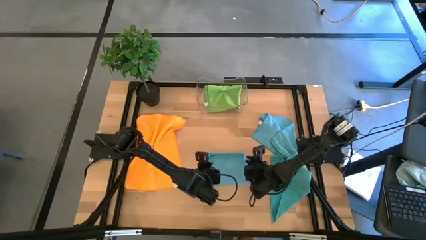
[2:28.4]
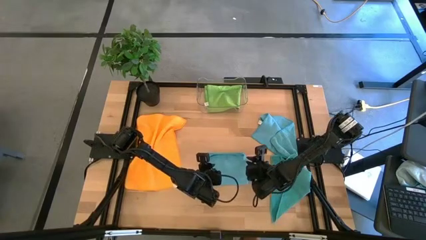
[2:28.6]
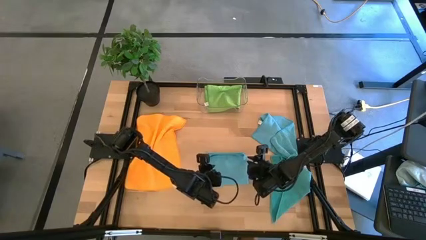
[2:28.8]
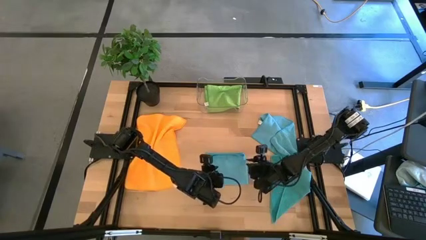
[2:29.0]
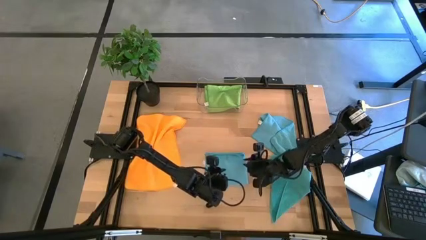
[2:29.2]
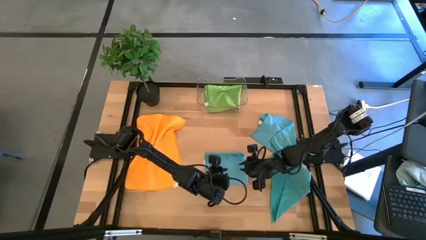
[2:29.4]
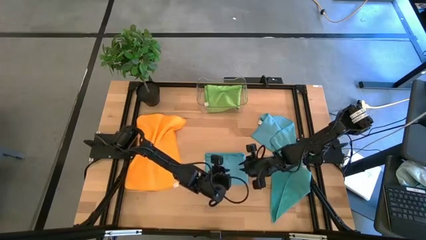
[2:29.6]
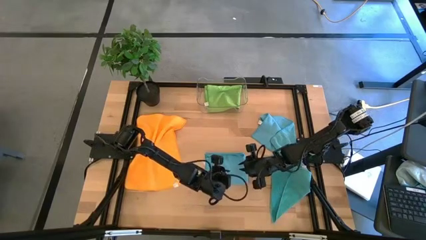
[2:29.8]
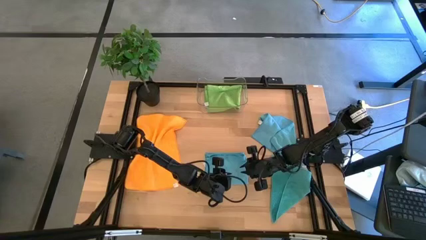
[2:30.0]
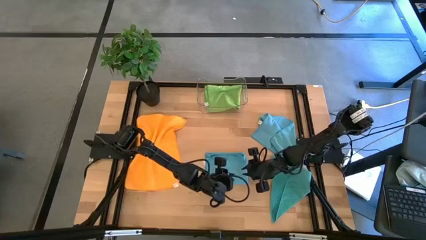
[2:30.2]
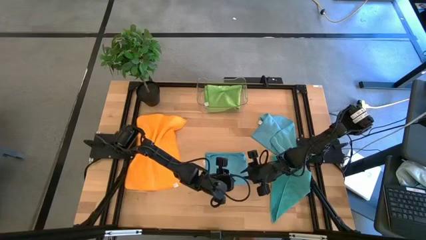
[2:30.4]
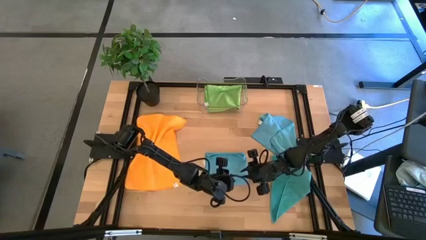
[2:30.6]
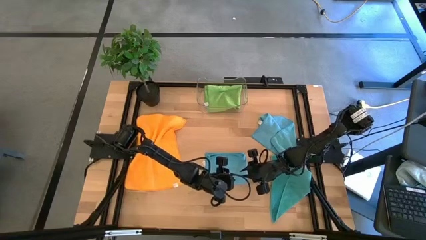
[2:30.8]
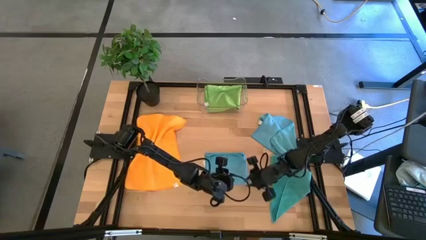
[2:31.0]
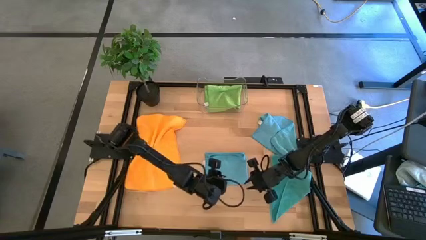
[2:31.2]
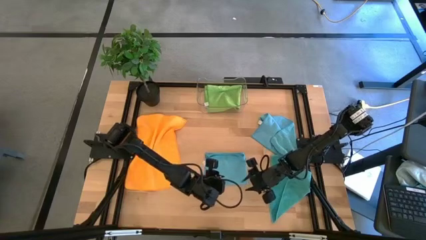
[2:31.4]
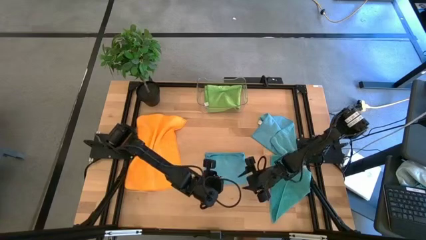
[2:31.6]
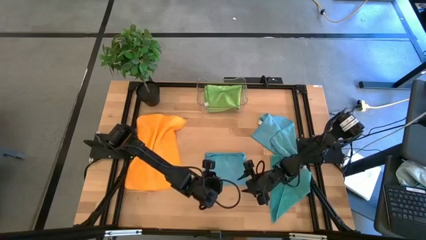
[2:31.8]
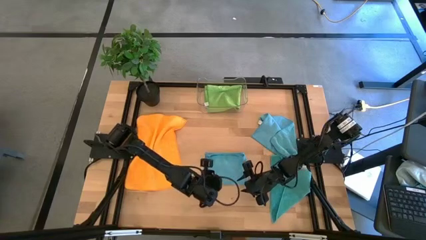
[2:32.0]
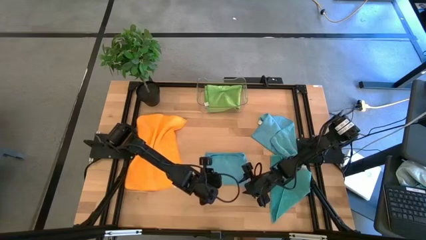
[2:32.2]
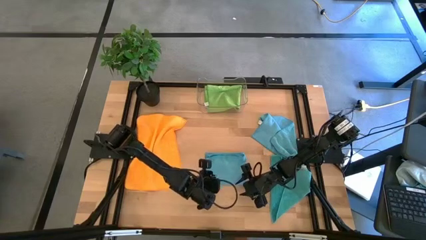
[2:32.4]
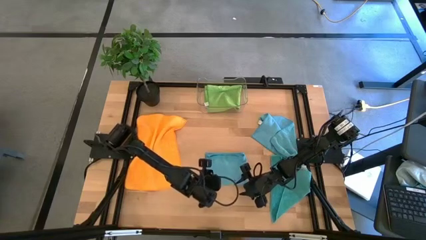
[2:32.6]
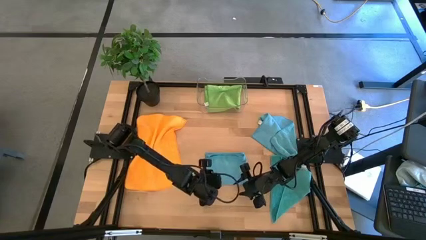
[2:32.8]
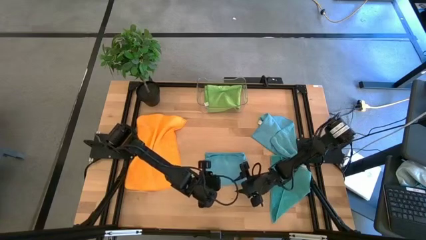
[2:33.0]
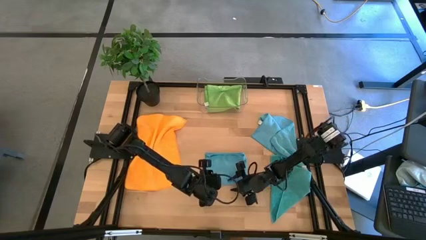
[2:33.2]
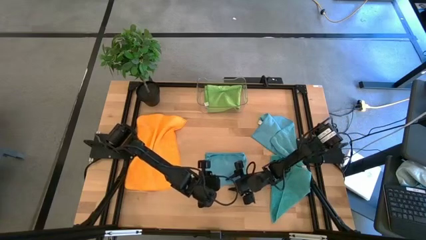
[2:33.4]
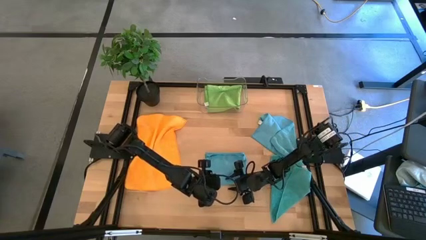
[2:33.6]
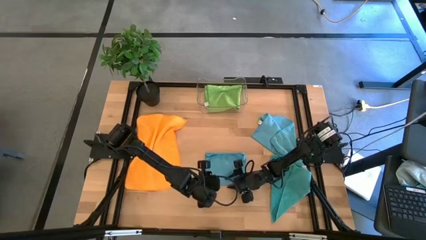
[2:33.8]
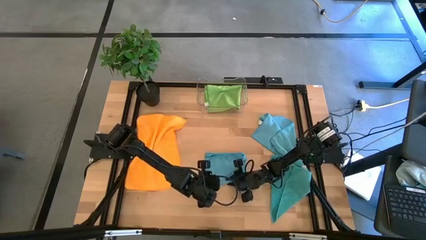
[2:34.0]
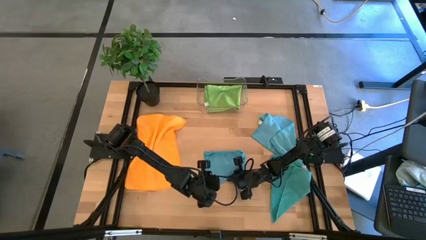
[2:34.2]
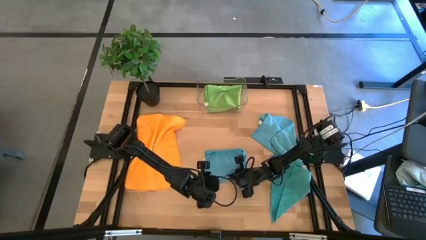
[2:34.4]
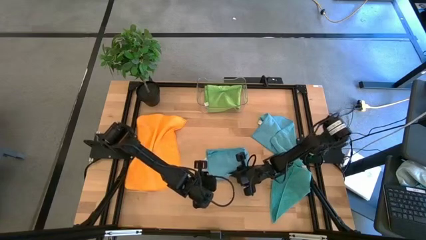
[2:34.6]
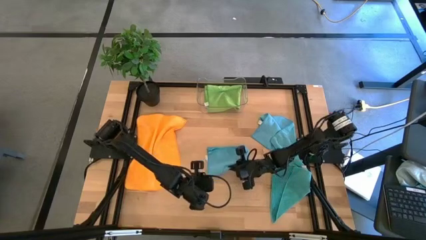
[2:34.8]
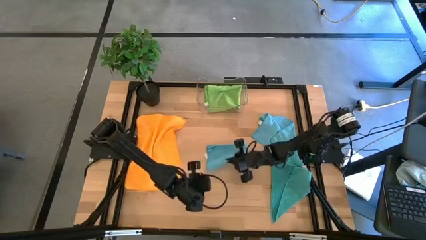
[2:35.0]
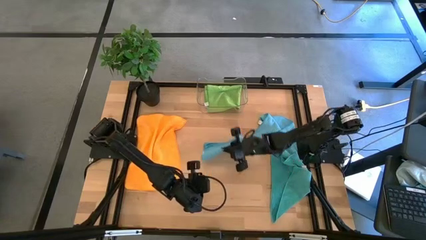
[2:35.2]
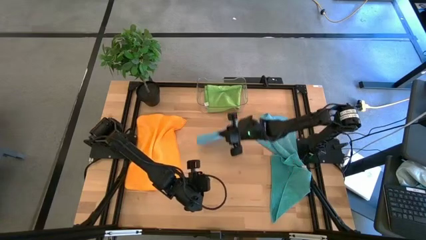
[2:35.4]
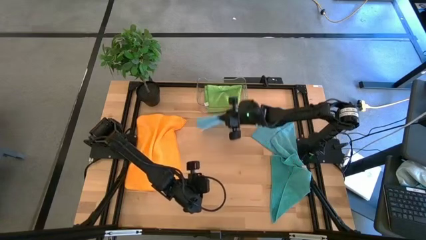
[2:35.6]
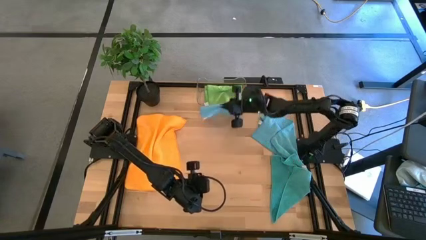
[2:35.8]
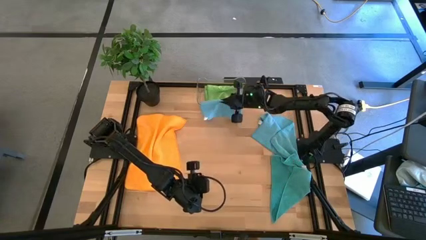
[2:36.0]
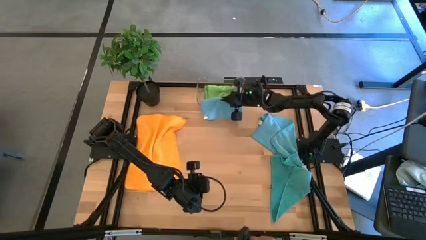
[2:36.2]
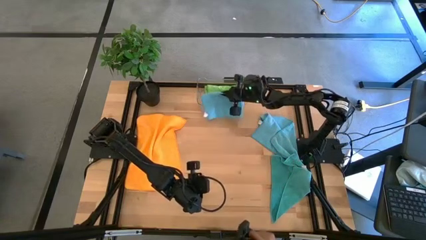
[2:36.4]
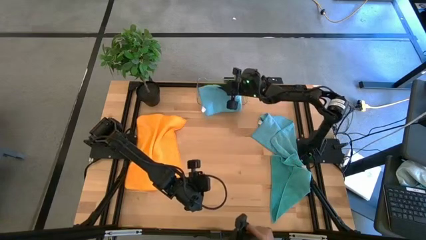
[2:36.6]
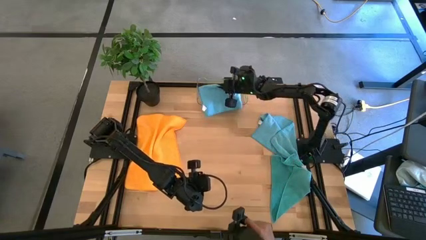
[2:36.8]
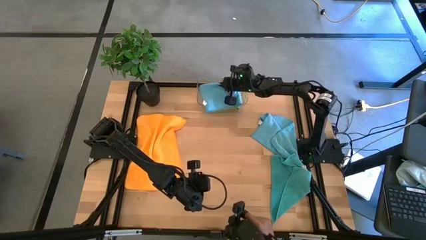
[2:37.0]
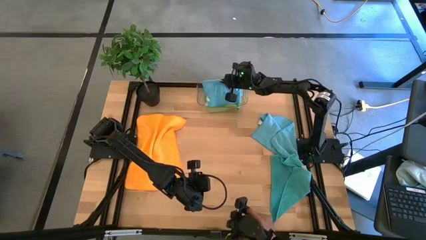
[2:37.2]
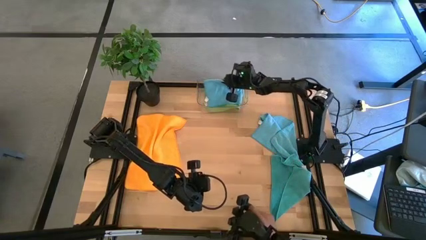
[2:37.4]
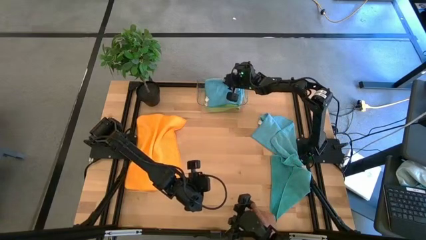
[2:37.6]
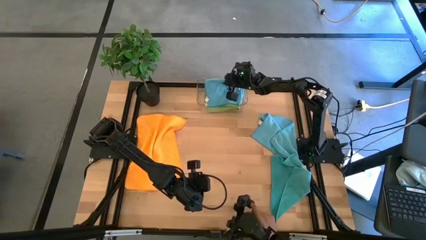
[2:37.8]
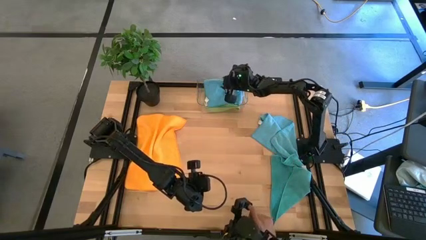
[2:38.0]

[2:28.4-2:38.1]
Task: Fold microfiber towels
Put the folded blue microfiber towel into the transparent bin

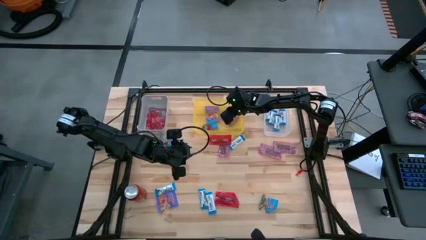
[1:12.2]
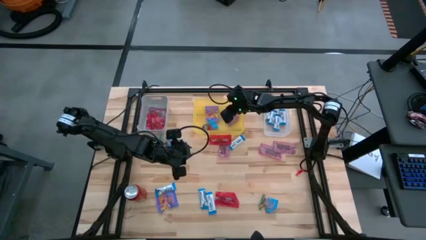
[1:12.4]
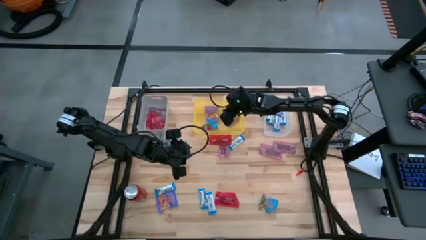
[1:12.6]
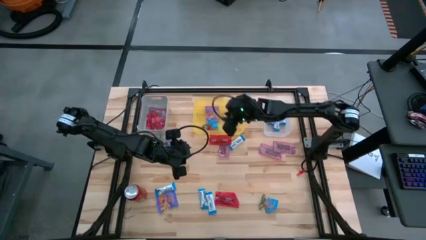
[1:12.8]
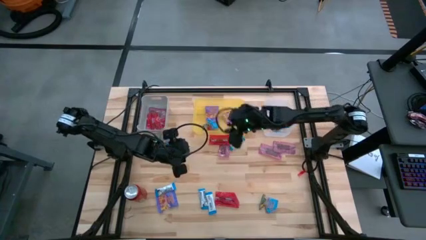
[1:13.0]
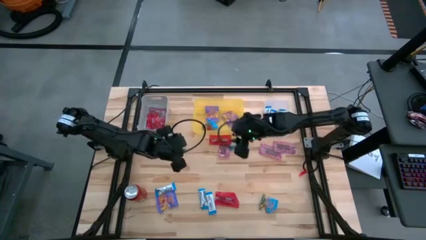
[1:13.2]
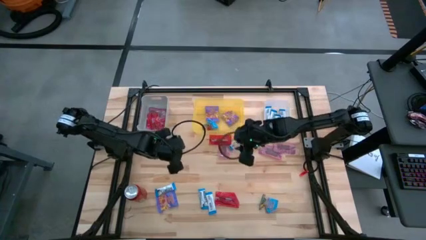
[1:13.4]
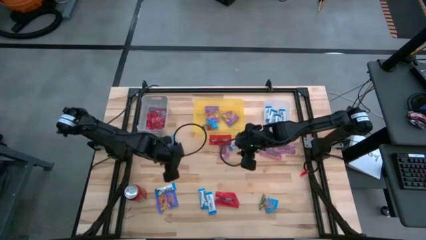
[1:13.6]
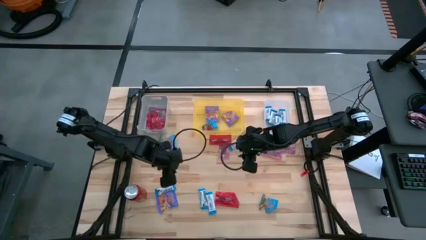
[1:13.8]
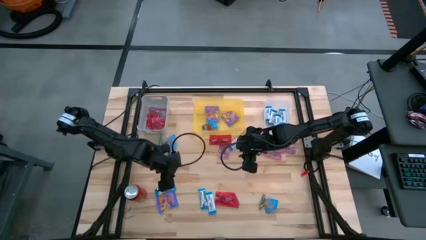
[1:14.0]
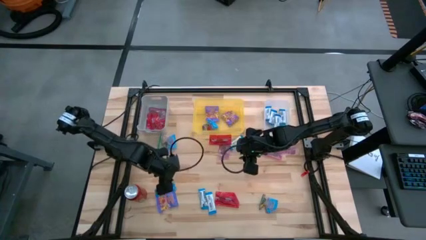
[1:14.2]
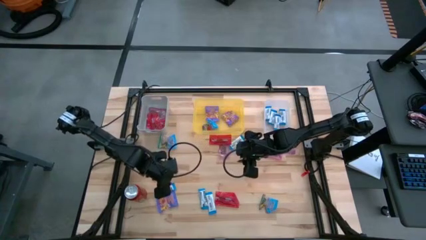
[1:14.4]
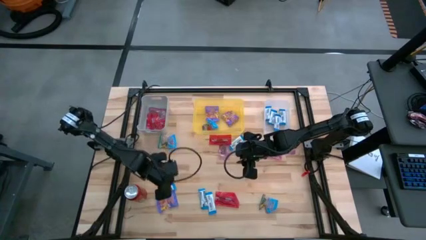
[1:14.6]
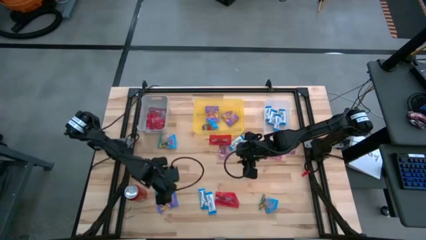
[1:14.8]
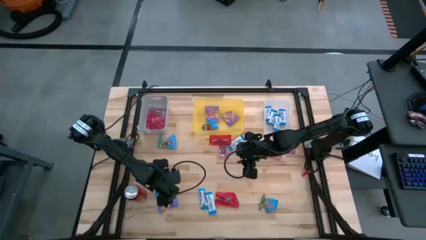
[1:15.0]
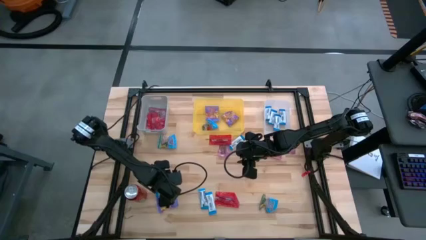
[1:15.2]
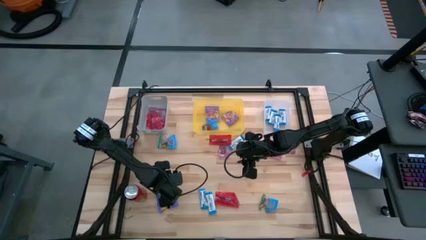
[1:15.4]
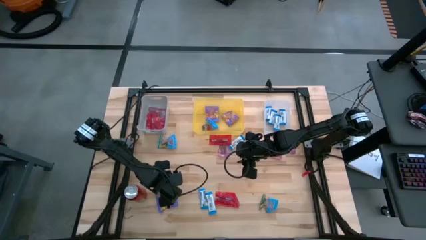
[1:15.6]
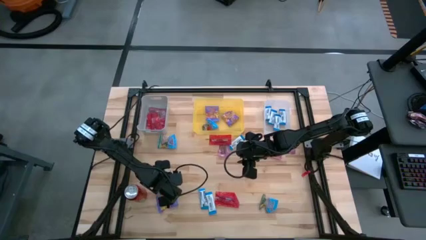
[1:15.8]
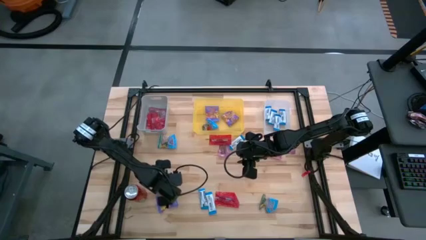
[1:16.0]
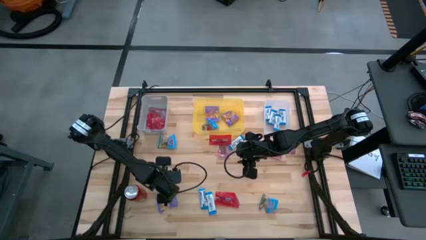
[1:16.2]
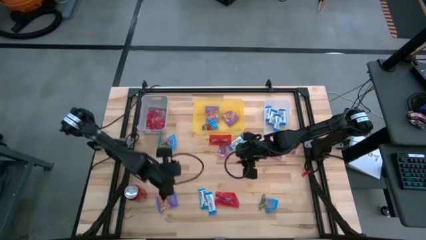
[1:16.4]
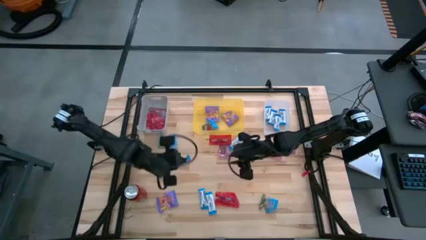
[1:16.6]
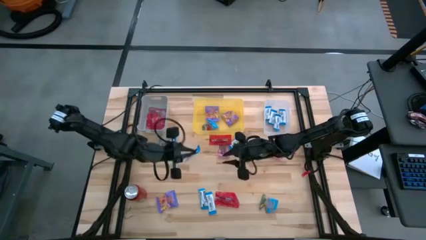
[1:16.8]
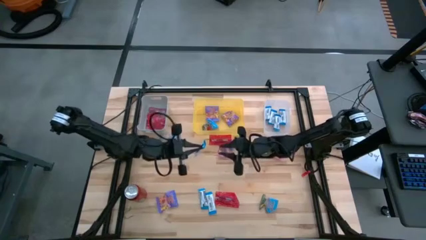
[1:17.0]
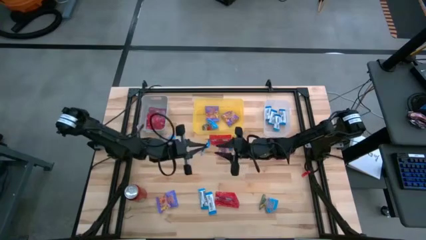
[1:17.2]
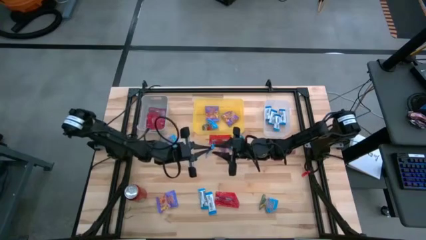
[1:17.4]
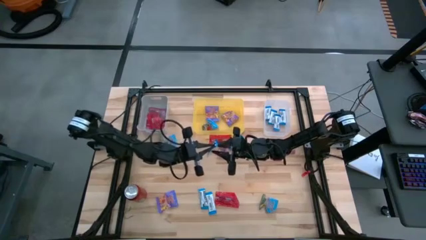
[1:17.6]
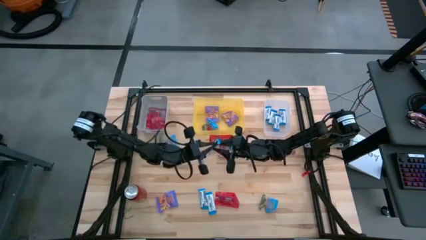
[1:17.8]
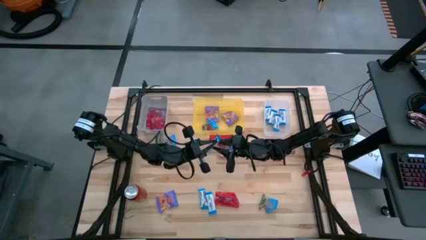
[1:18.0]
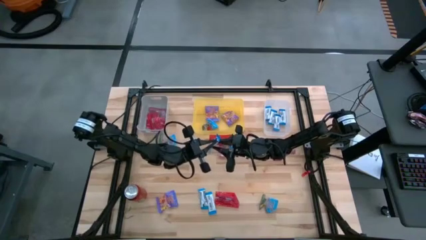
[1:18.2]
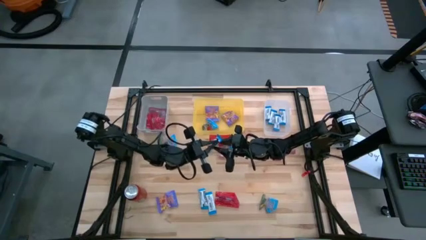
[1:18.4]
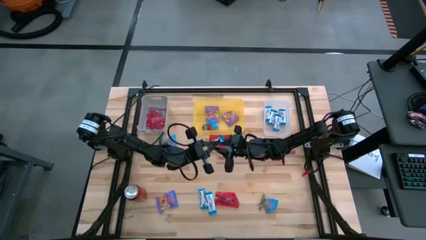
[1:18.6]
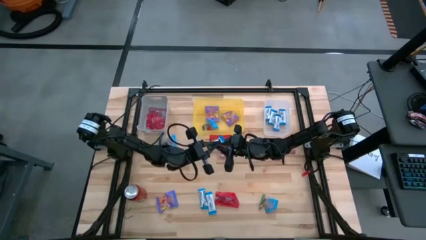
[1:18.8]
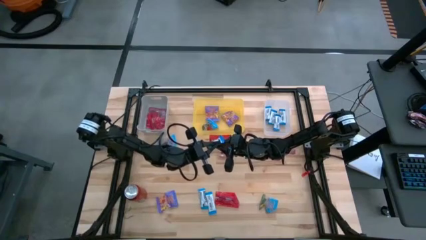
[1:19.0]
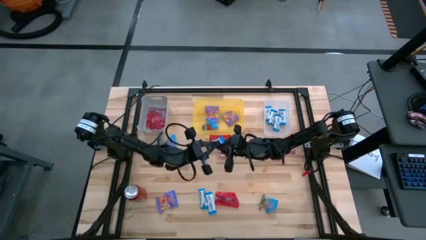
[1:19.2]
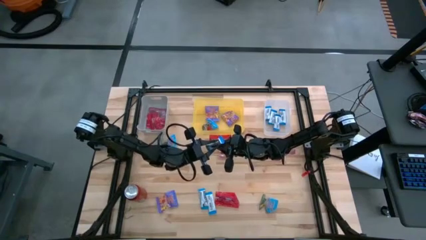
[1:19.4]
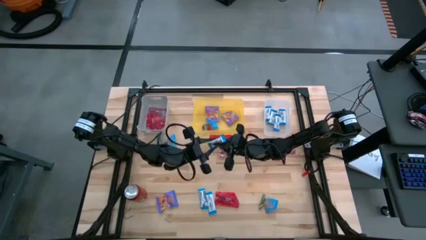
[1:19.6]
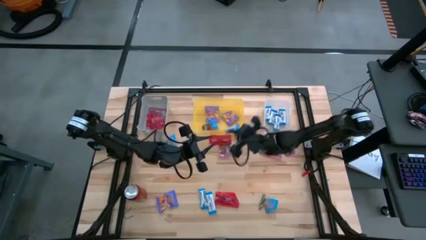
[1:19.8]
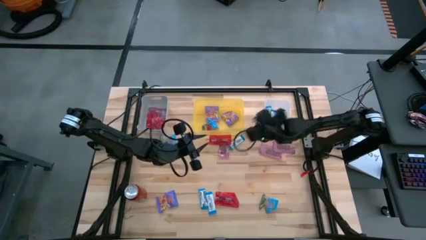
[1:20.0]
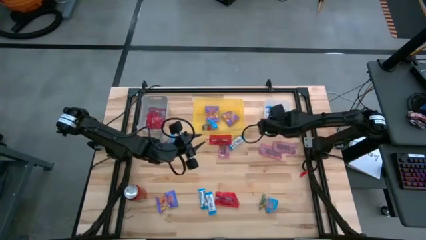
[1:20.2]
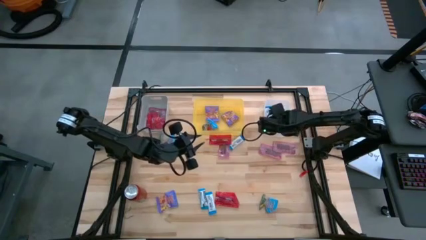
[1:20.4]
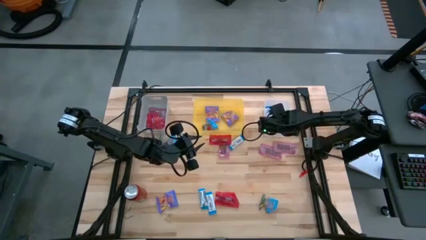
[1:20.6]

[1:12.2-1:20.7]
Task: Sort candy
Put the white chocolate into the transparent bin
